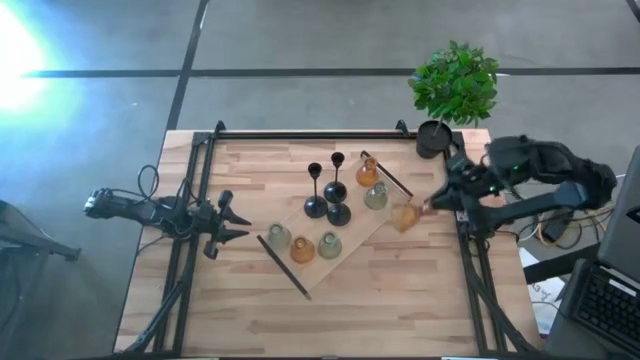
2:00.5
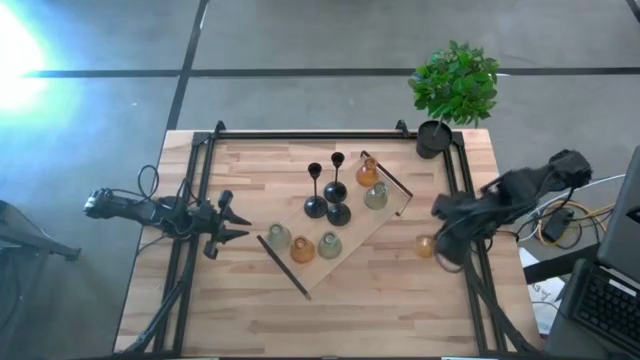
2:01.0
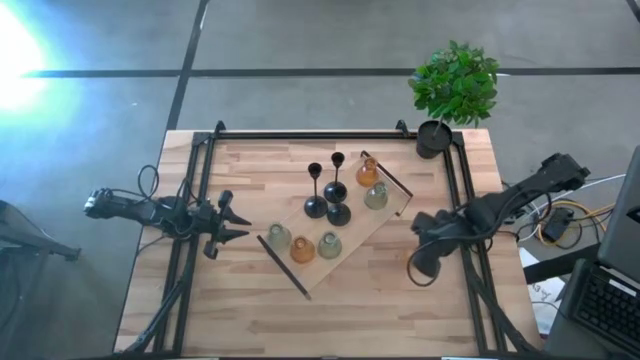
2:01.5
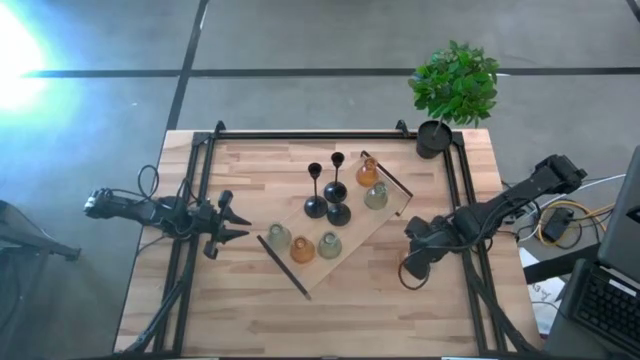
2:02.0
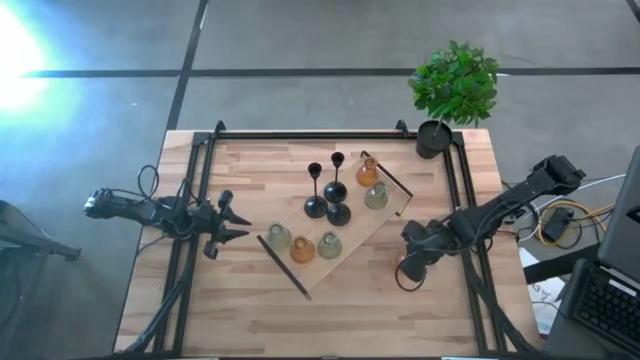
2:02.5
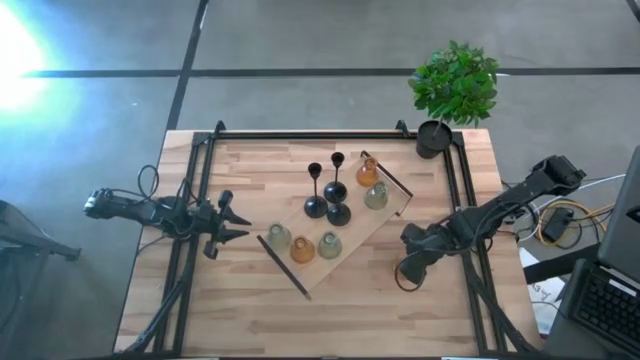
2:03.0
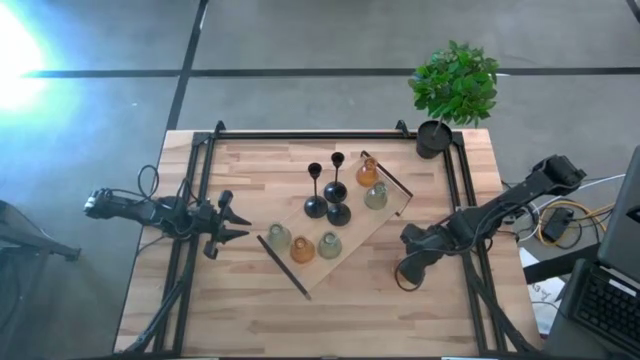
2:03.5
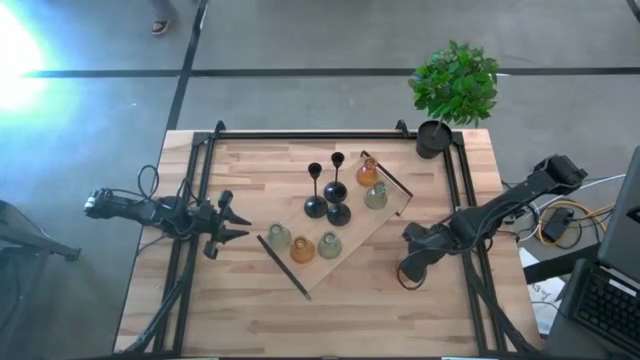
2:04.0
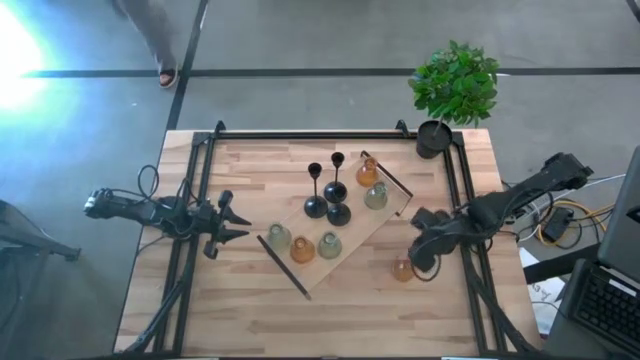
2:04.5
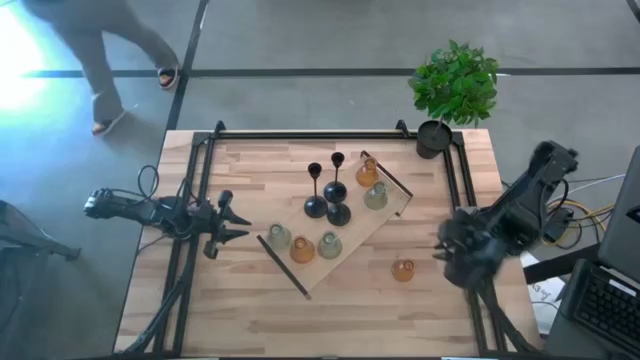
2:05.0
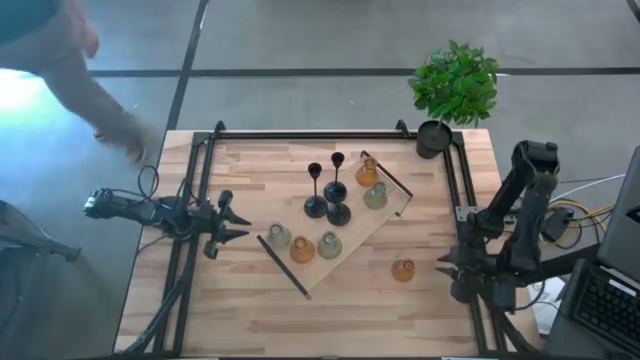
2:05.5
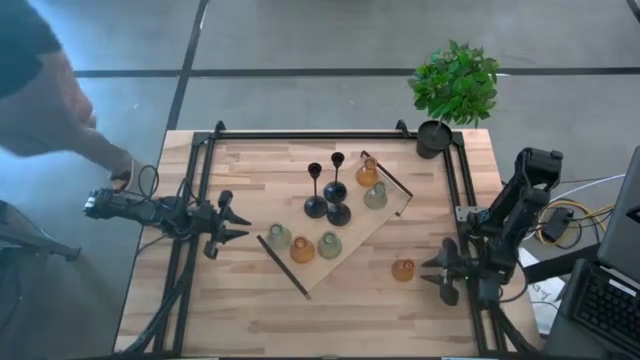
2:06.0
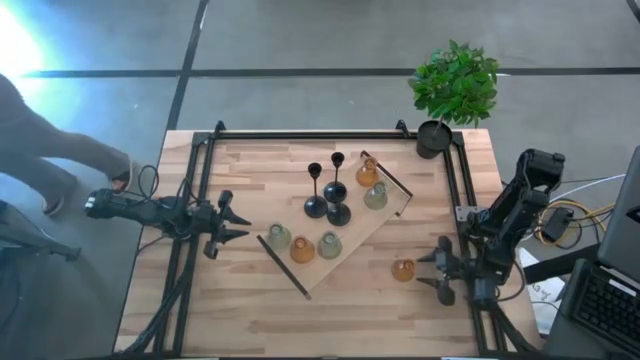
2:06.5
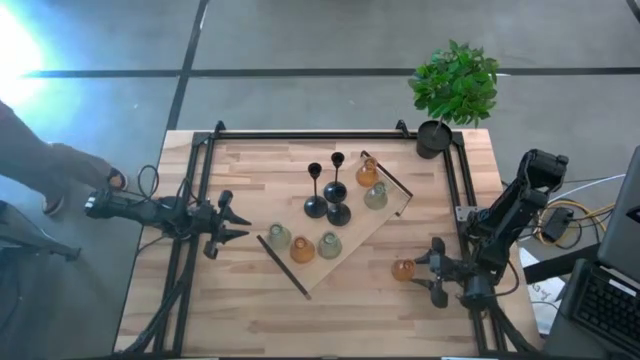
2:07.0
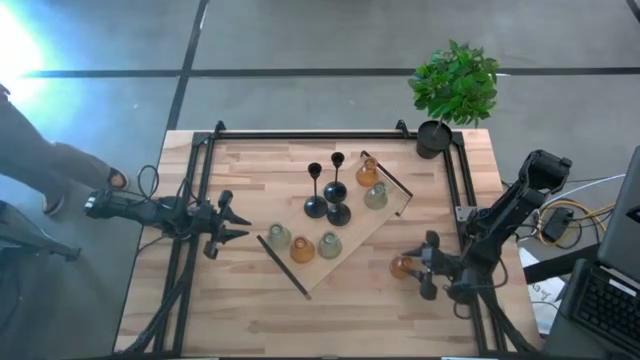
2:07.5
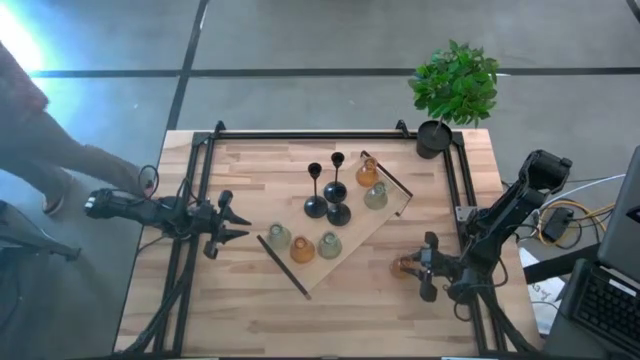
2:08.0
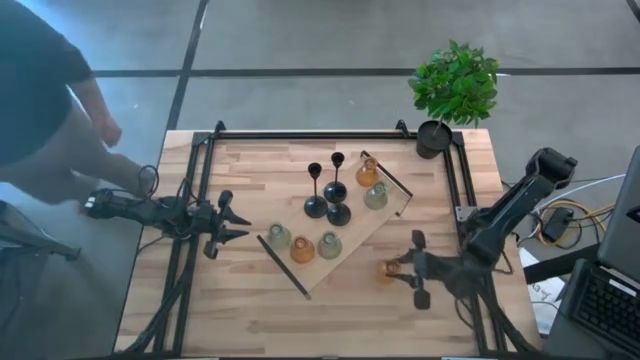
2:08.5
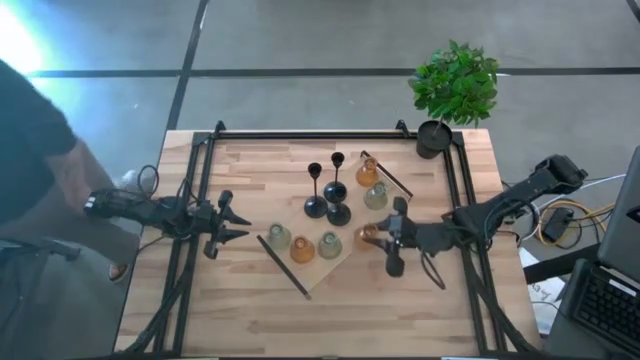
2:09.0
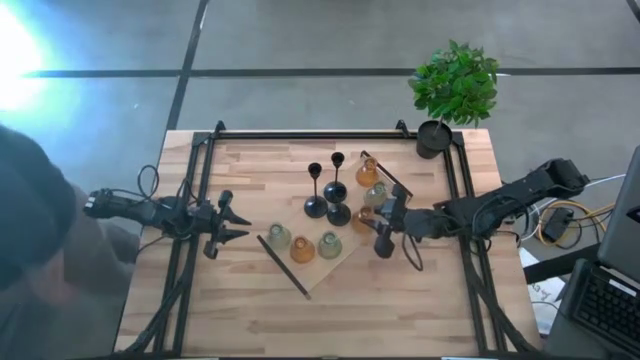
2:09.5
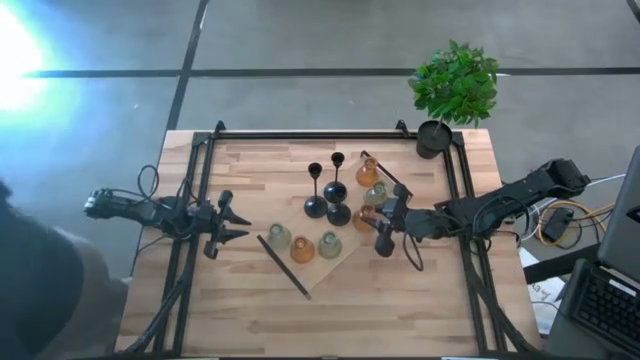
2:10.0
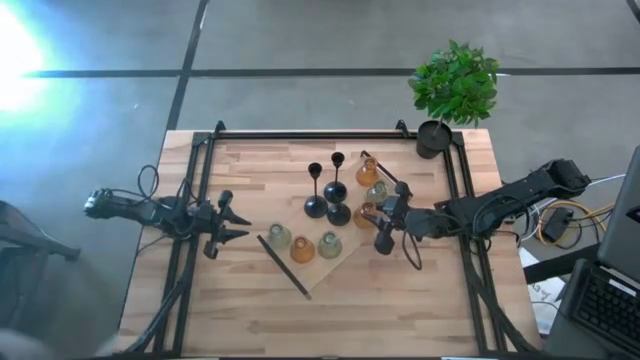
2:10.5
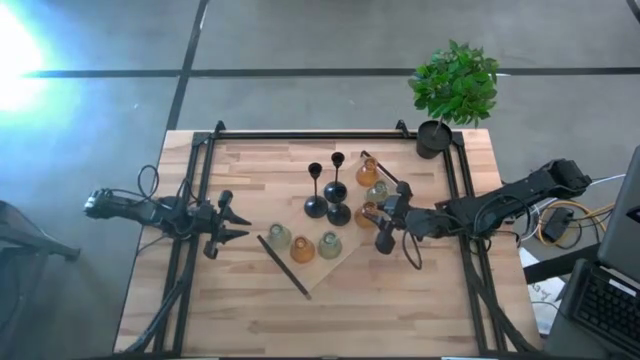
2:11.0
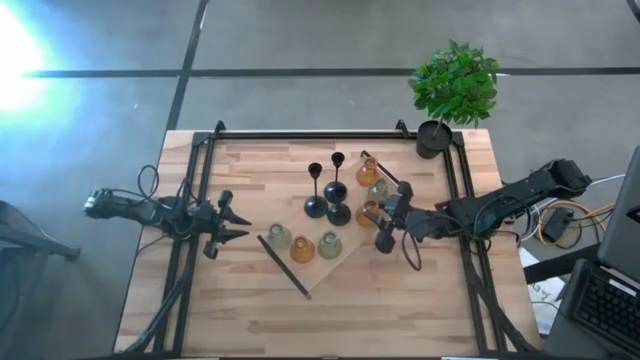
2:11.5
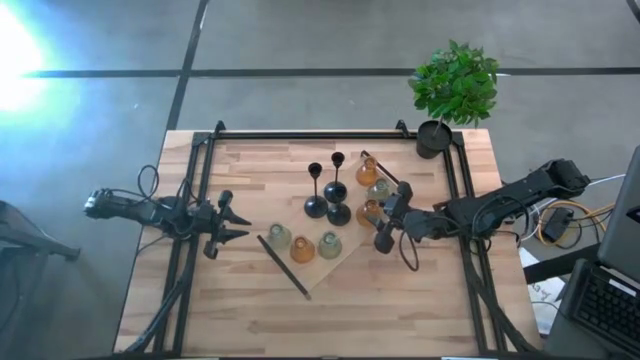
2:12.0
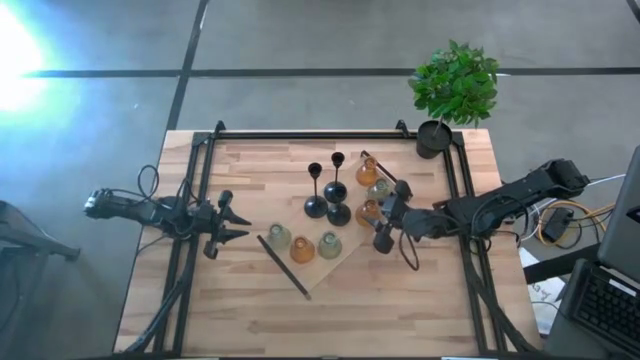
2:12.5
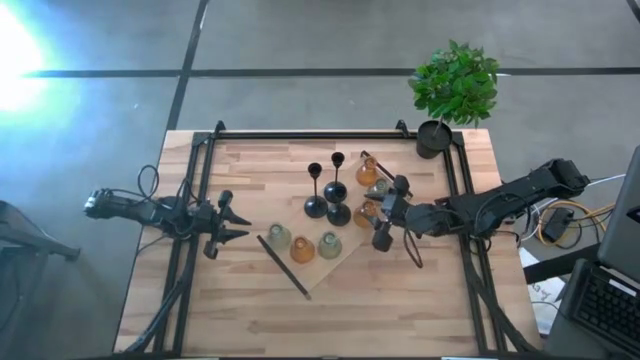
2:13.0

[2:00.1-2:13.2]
Task: Pick & Place candle stick holders
Put the yellow candle holder on the shelf

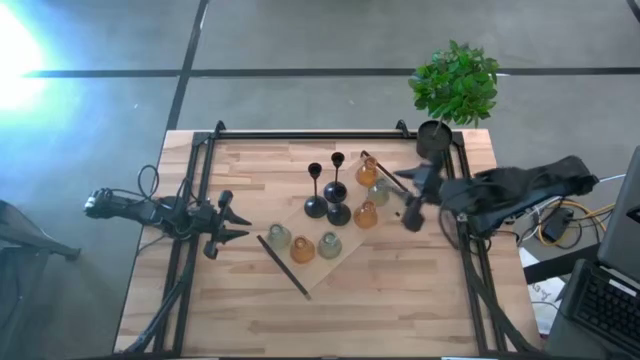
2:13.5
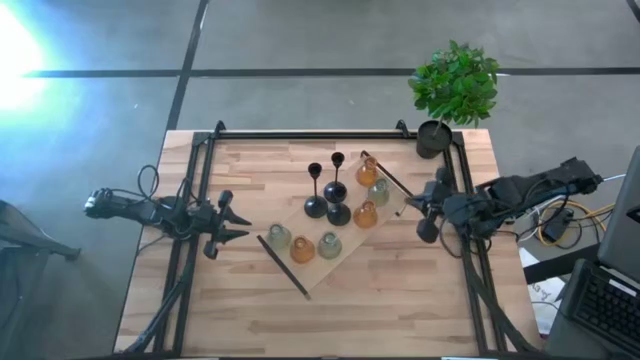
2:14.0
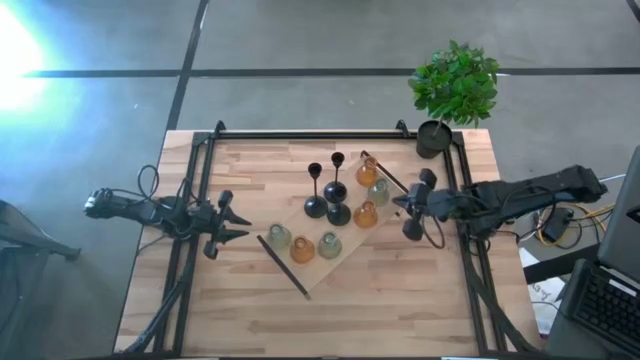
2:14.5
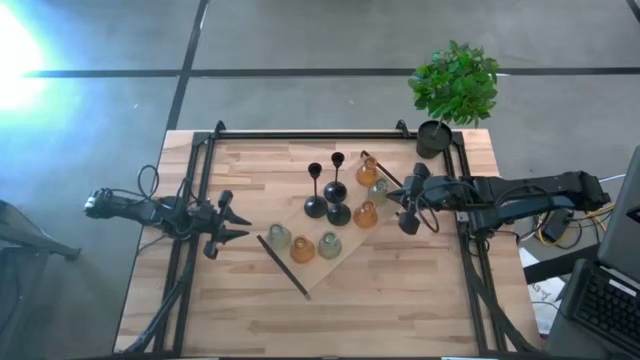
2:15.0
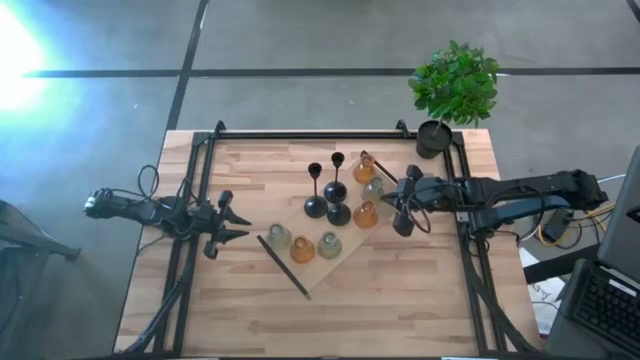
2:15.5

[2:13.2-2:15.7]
Adjust the green candle holder on the shelf

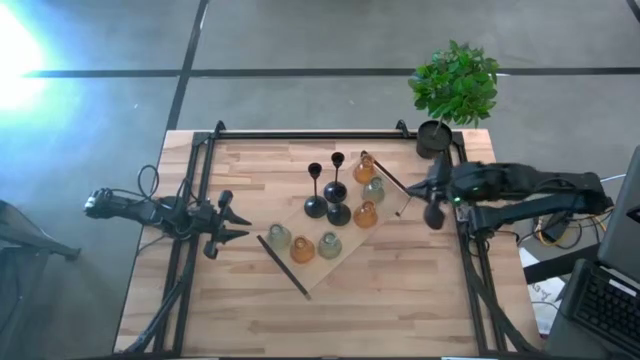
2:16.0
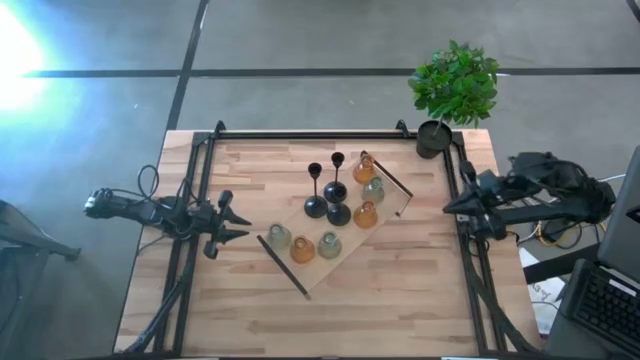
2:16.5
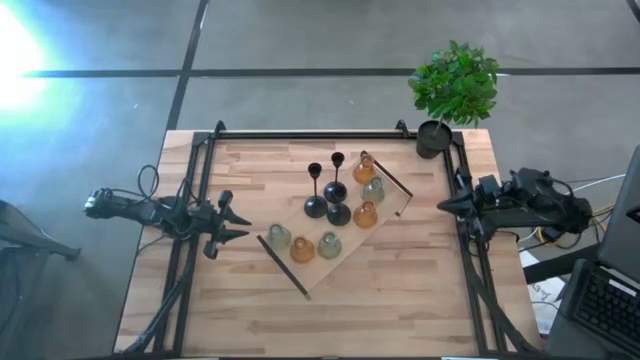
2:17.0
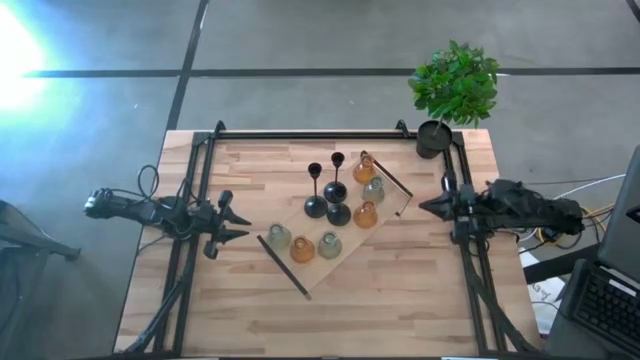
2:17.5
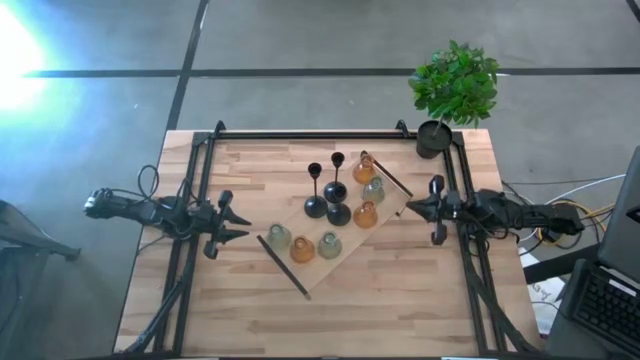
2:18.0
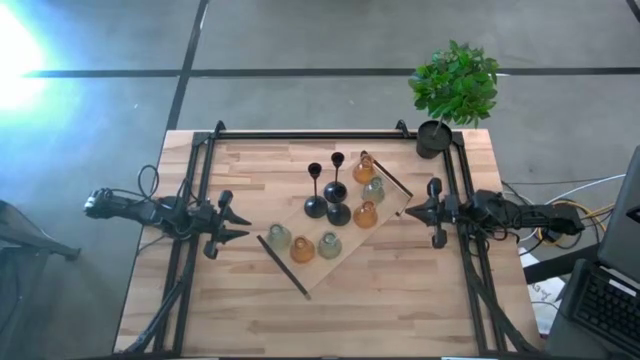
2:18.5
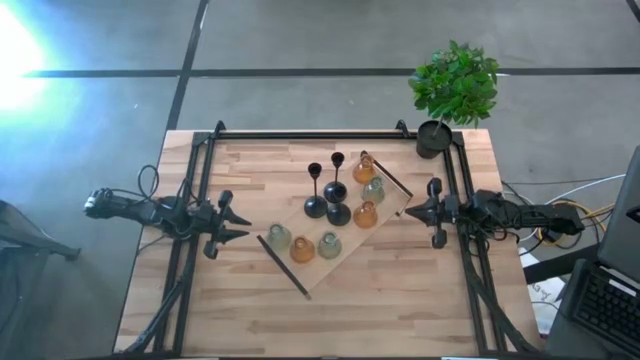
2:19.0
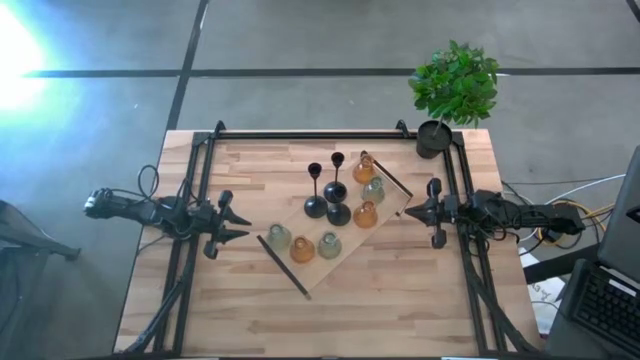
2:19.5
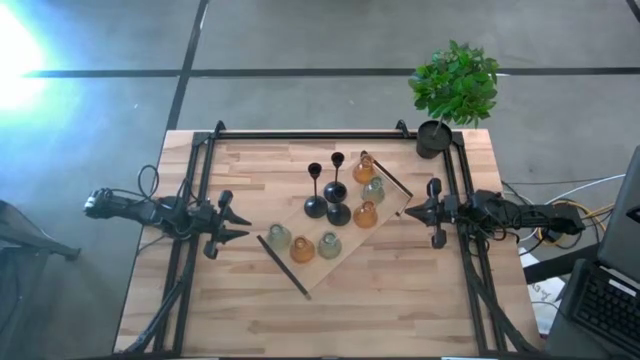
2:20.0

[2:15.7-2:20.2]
Return to Home Position

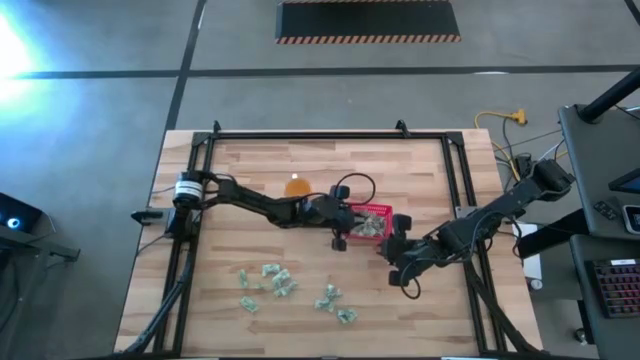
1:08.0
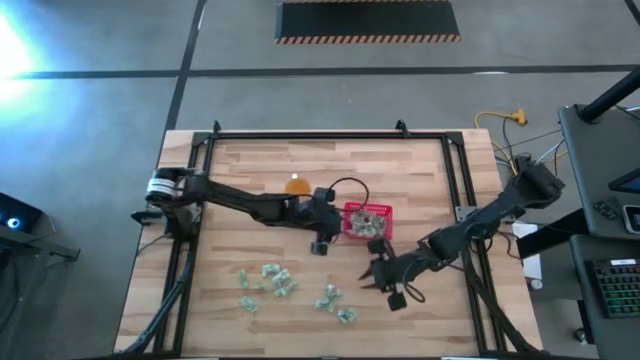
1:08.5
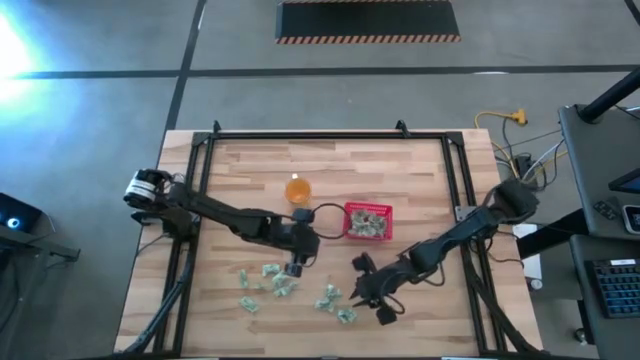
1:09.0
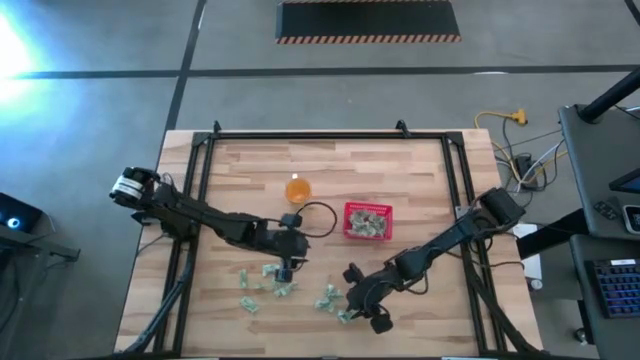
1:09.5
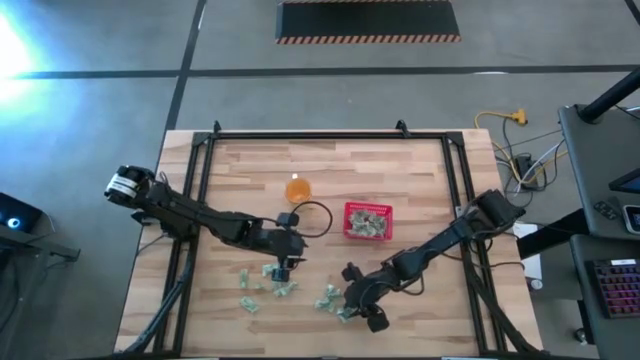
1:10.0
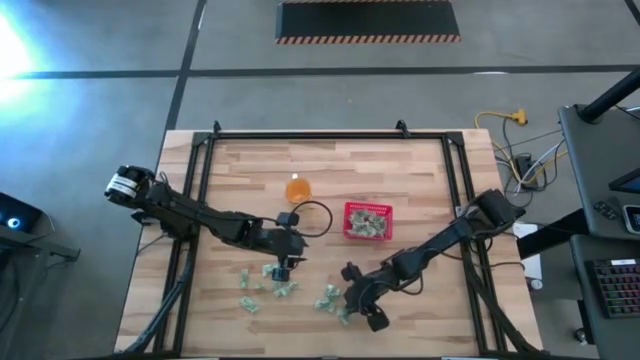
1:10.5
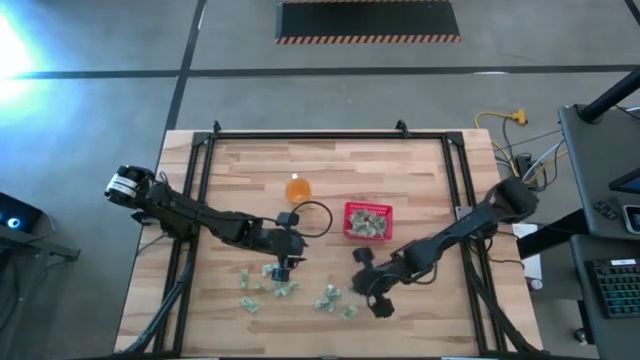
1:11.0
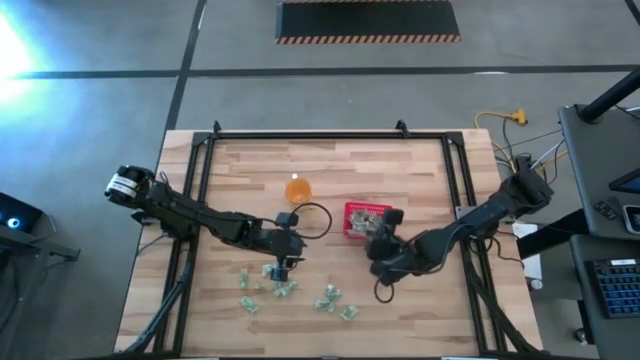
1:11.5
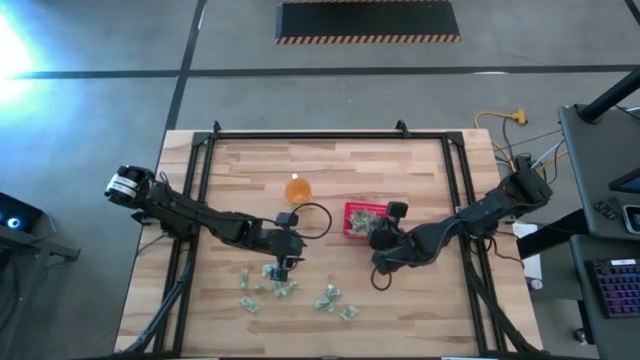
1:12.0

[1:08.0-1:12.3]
Task: Pick and place Stevia / Truvia into bins
Put the stevia packet into the basket
